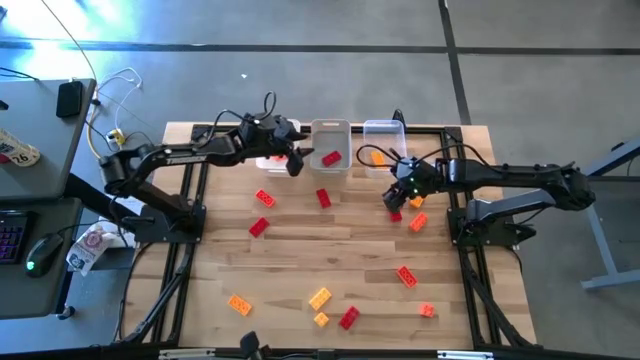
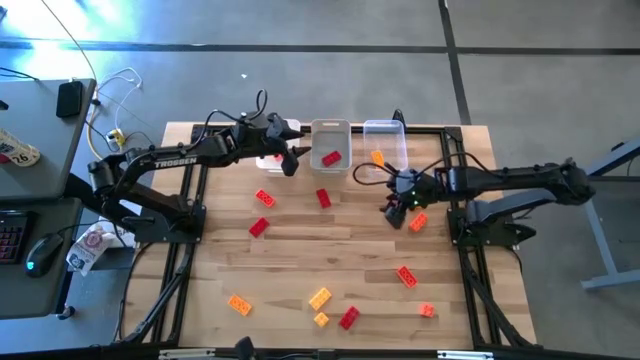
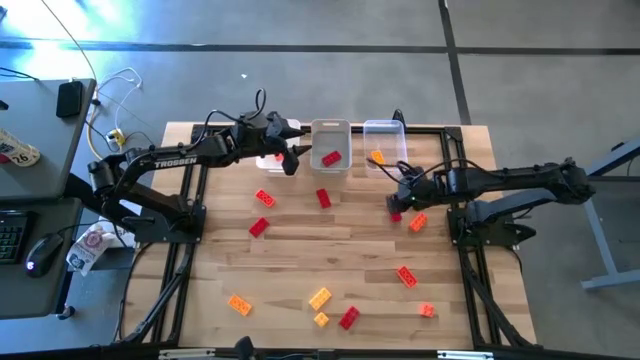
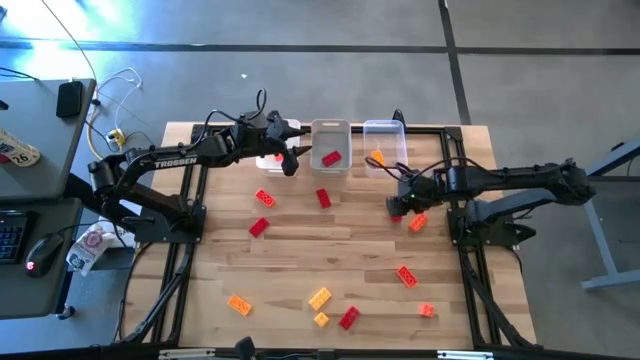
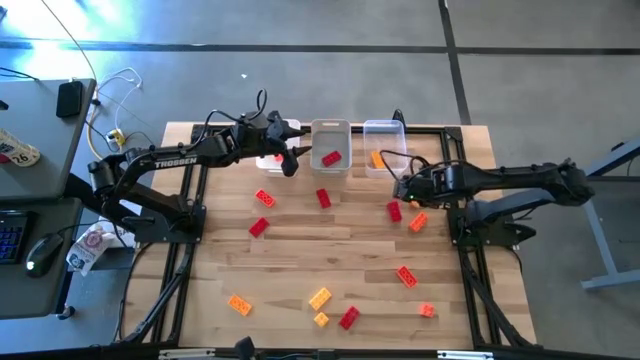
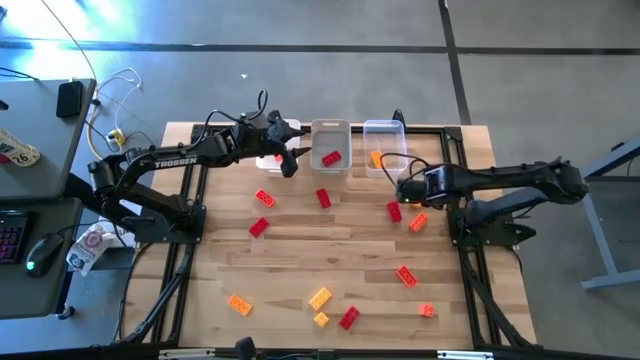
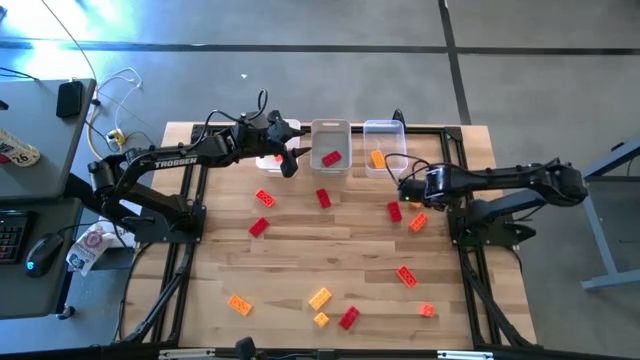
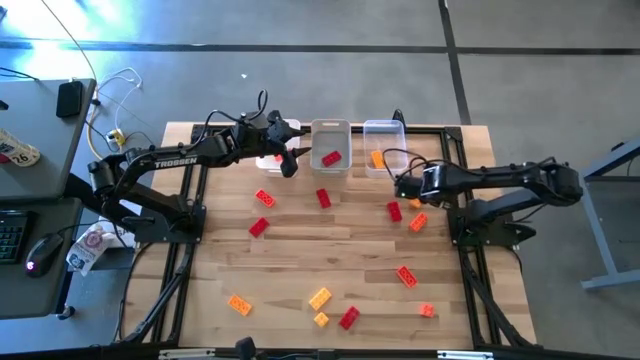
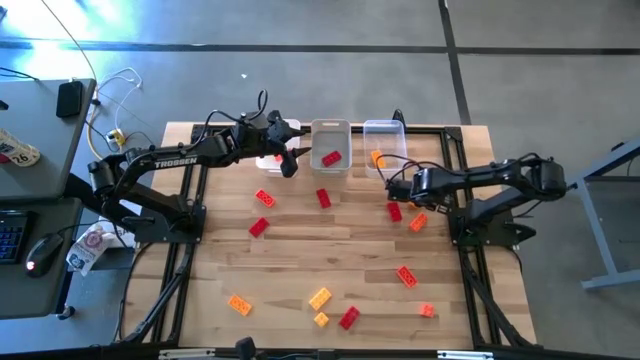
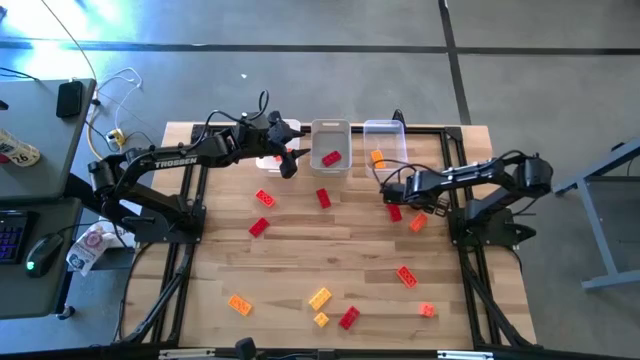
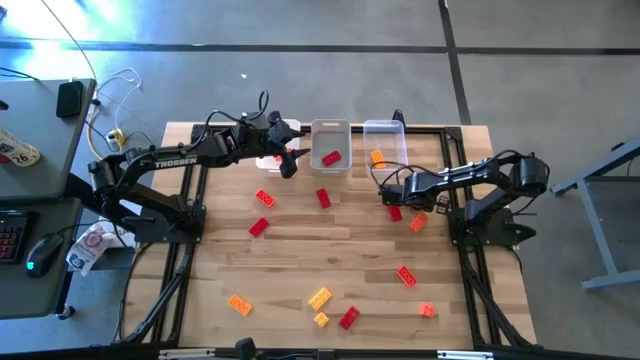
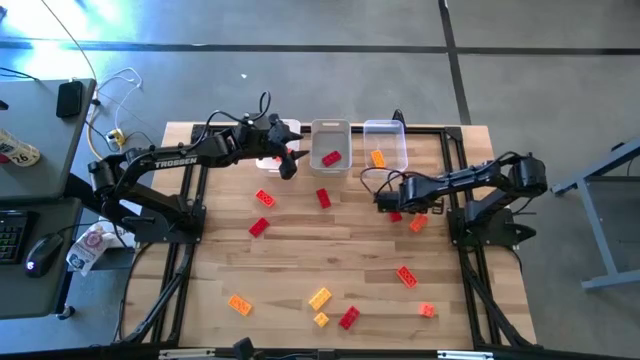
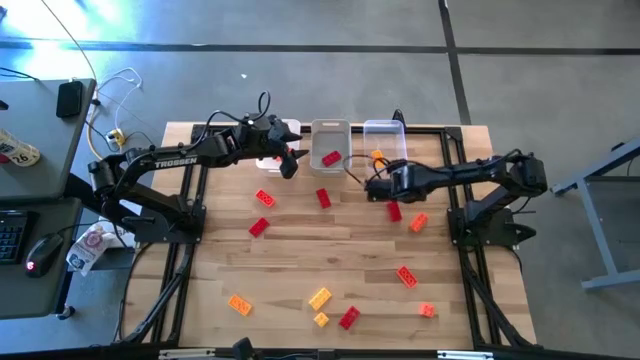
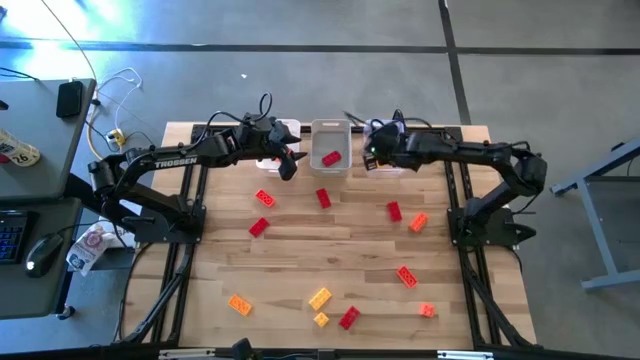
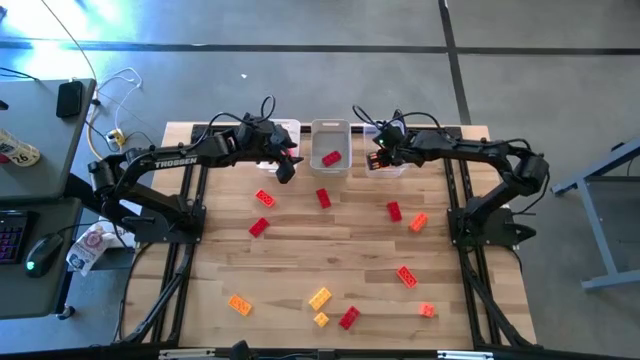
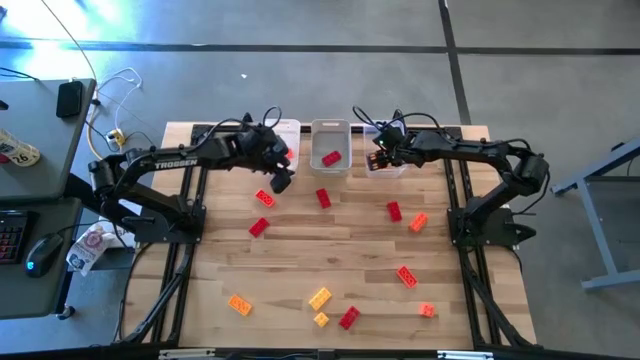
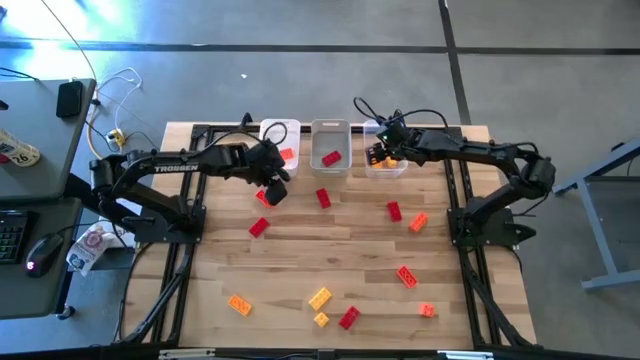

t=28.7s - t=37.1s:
Task: Sort & place blocks by color
Put the yellow game piece into the transparent bin

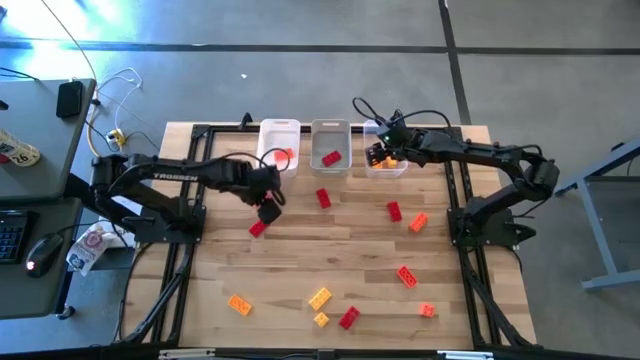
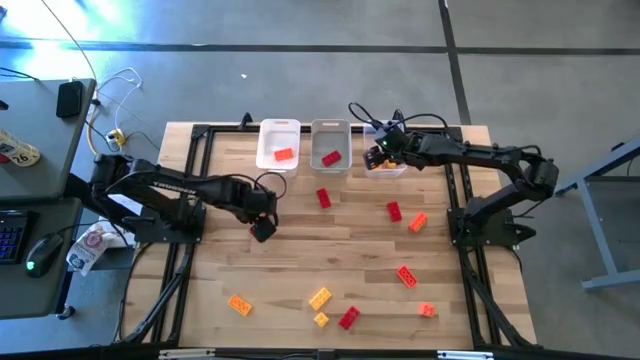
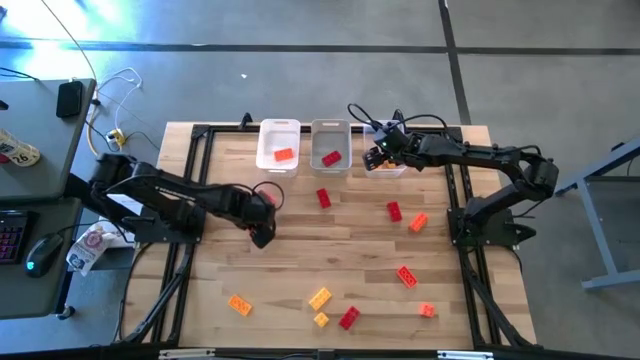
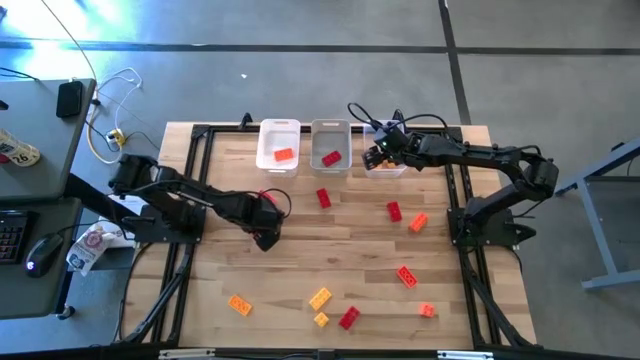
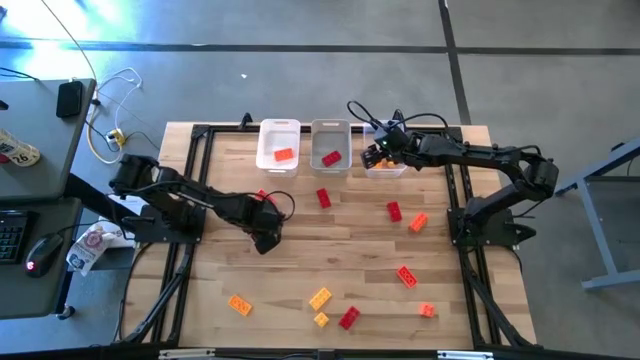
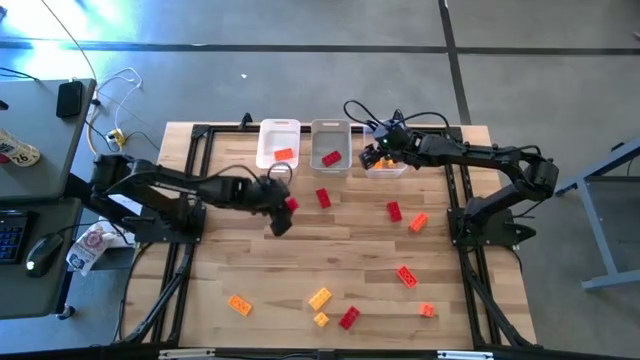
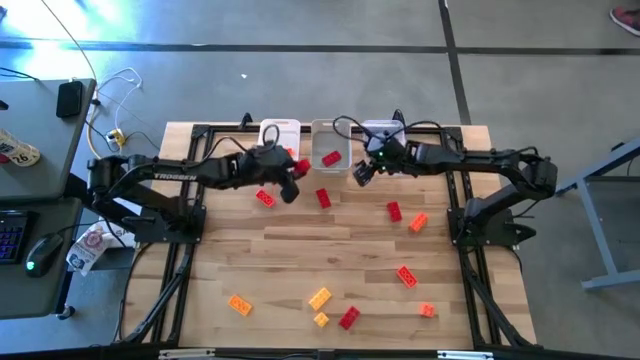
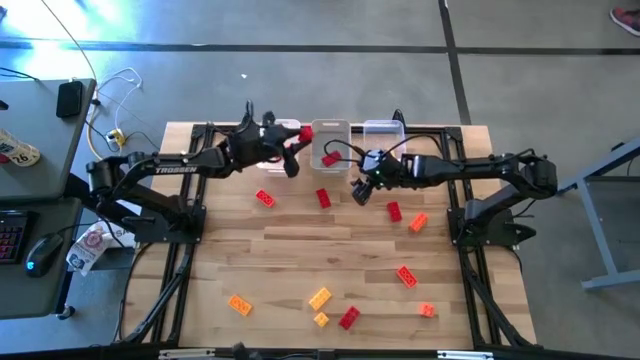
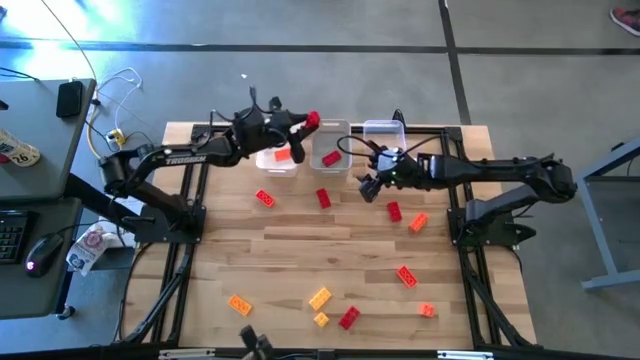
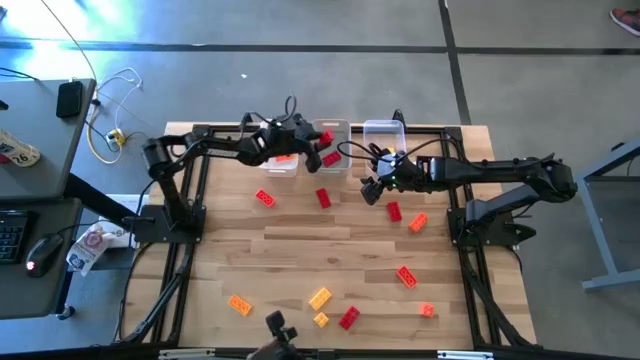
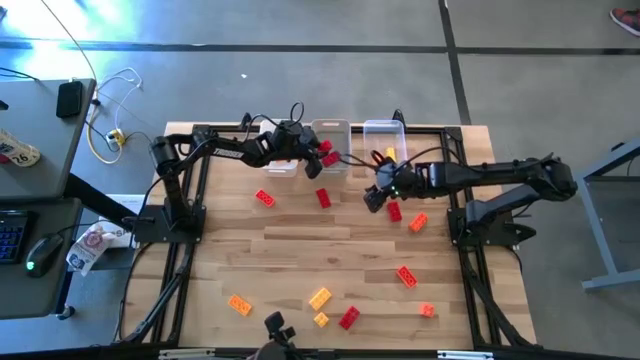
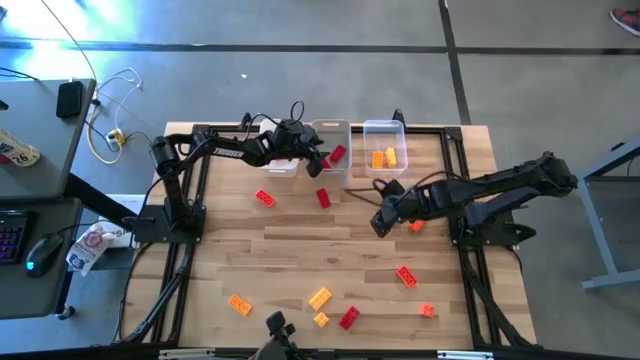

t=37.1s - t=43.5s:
Put the red game piece into the gray bin

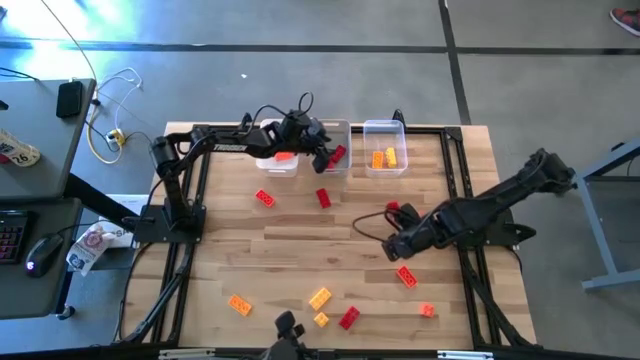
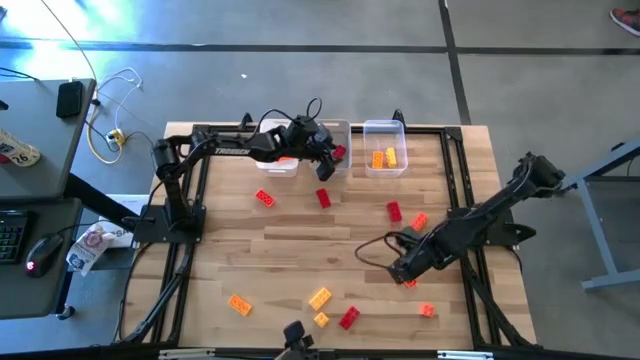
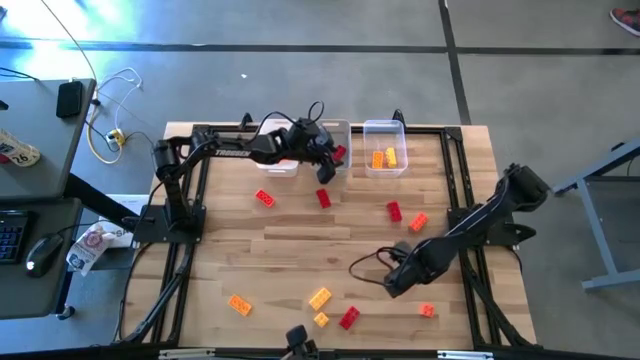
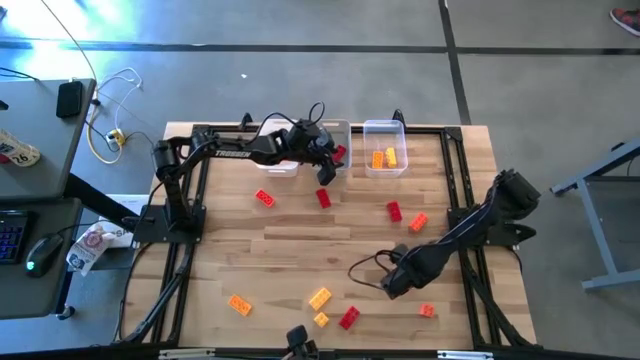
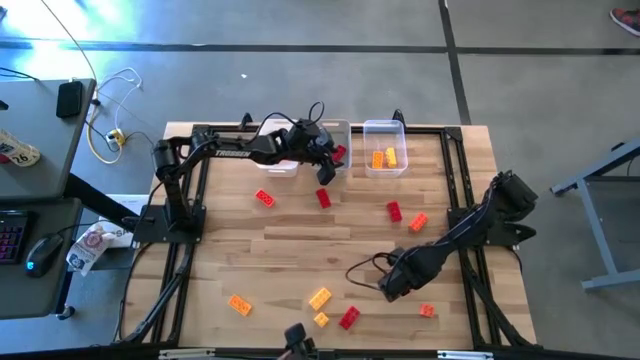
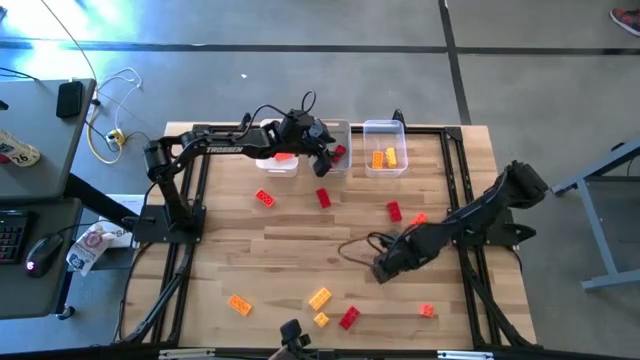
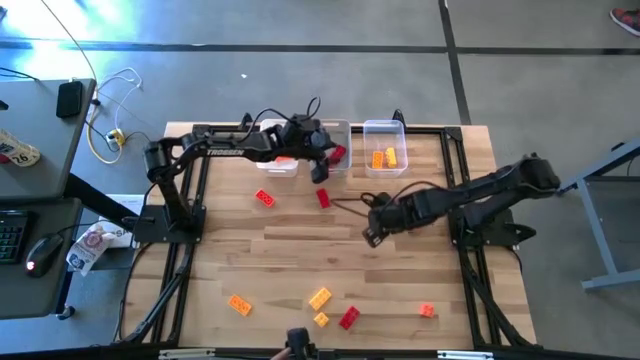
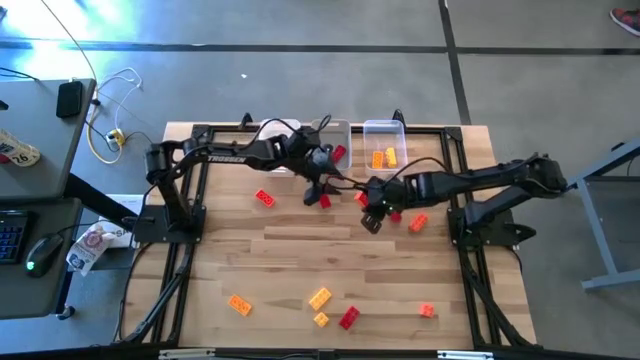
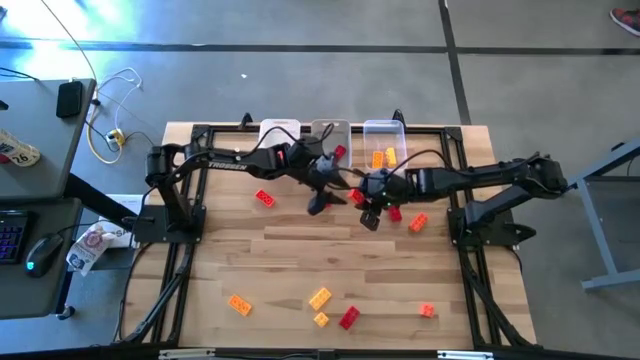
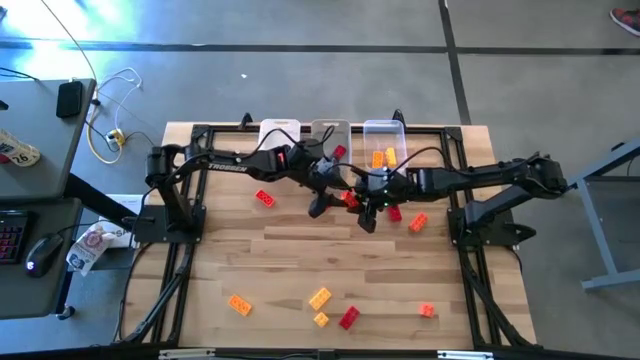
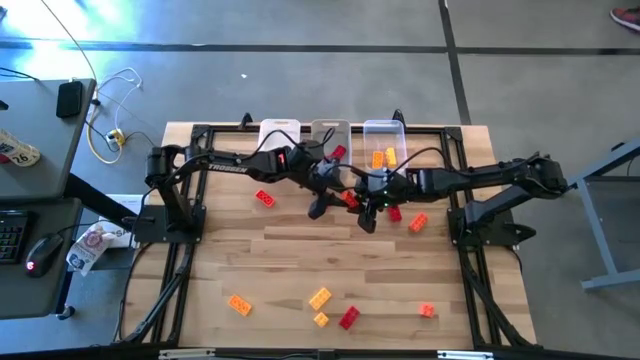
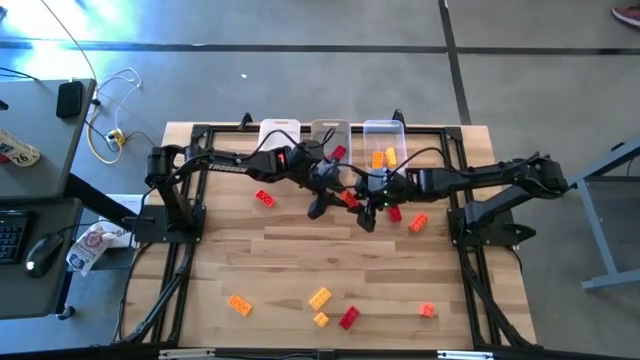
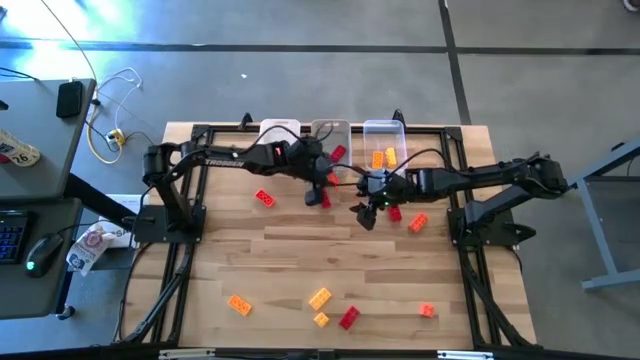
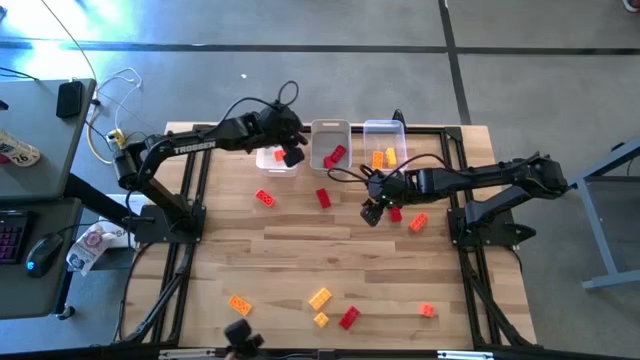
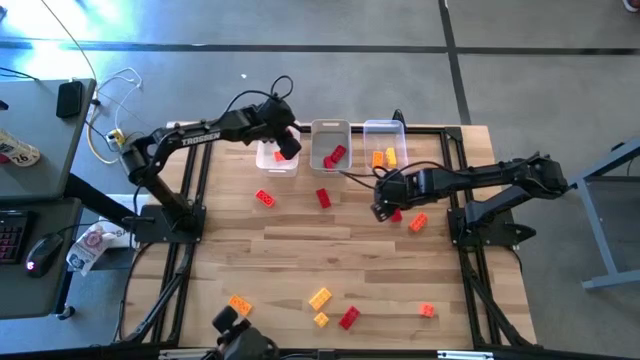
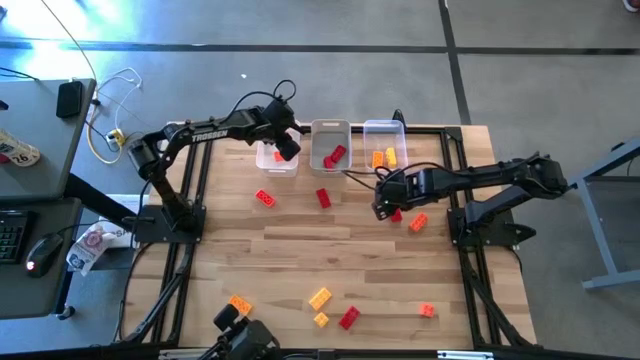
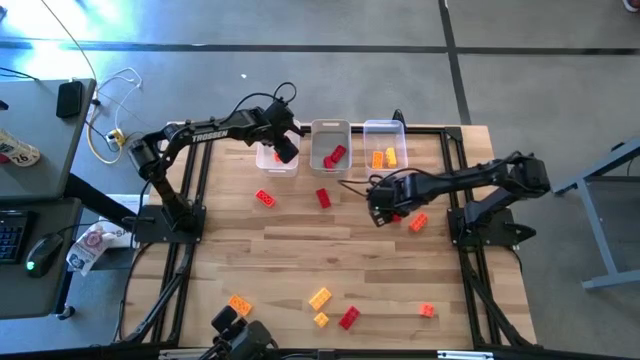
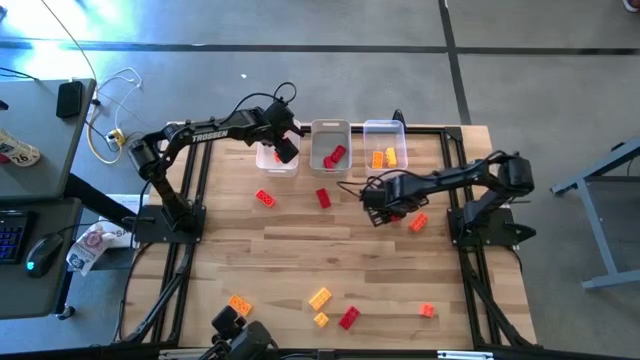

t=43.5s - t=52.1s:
Put the orange game piece into the white bin
